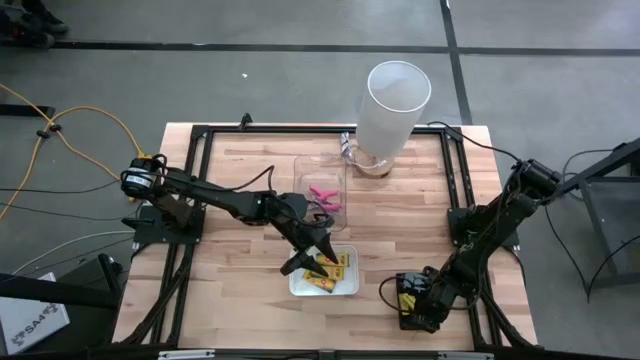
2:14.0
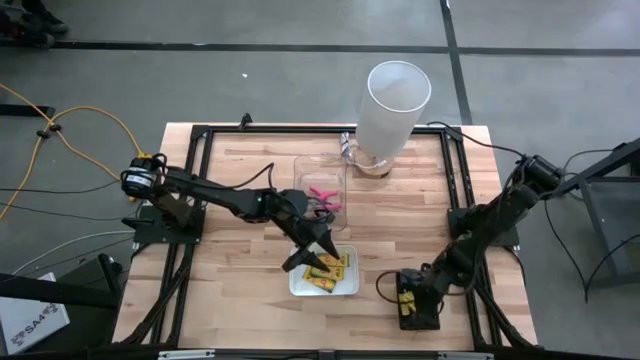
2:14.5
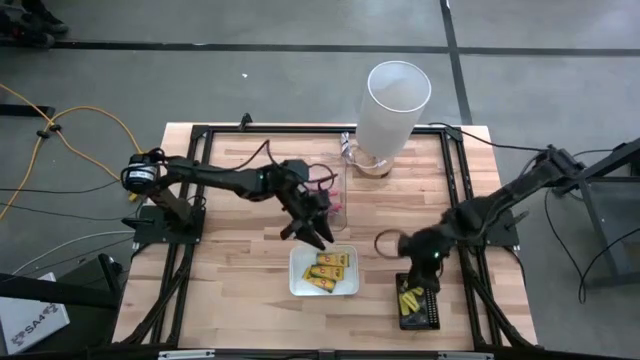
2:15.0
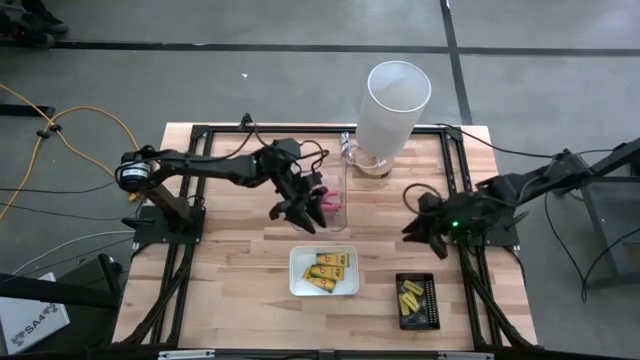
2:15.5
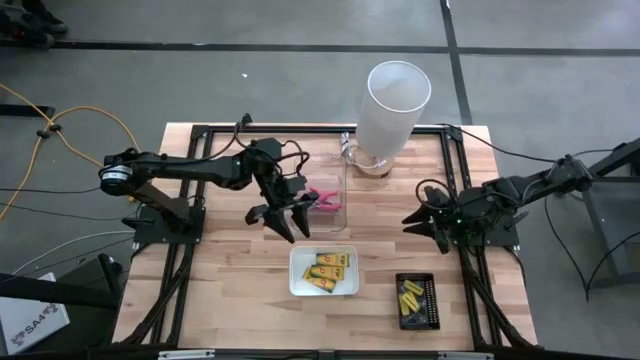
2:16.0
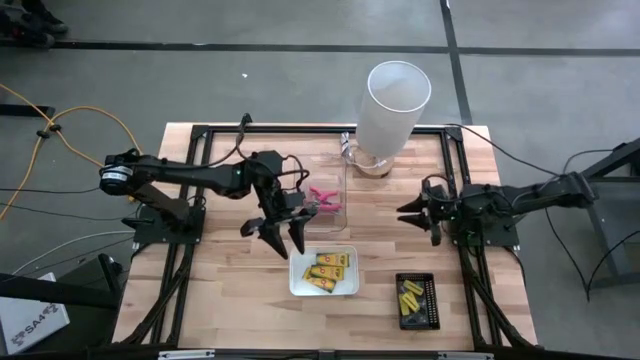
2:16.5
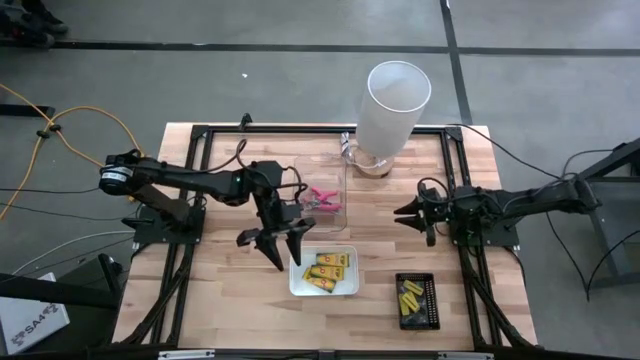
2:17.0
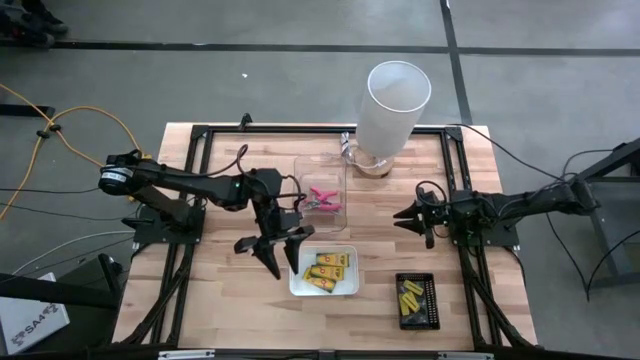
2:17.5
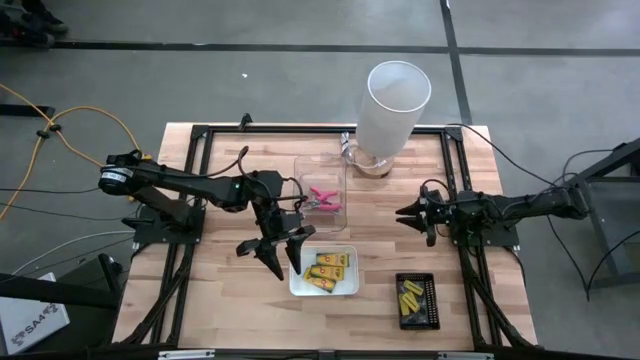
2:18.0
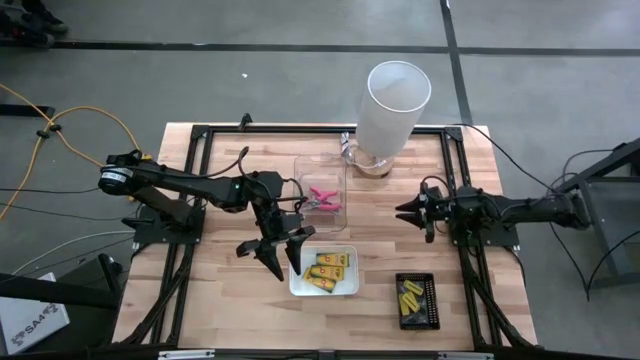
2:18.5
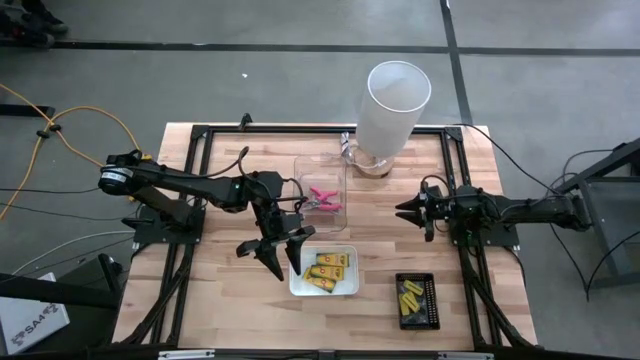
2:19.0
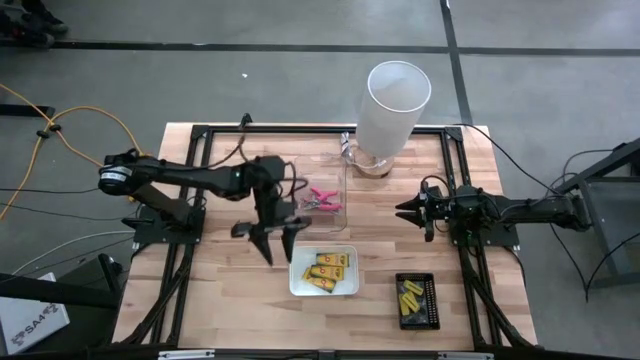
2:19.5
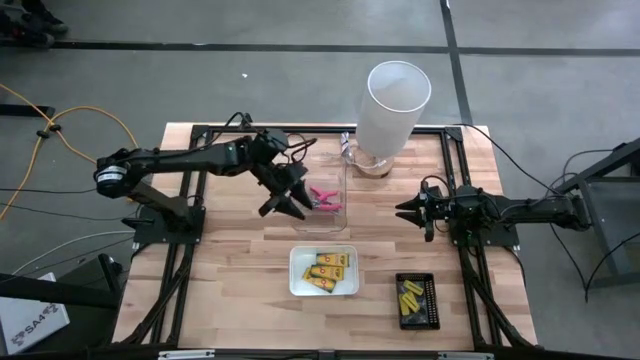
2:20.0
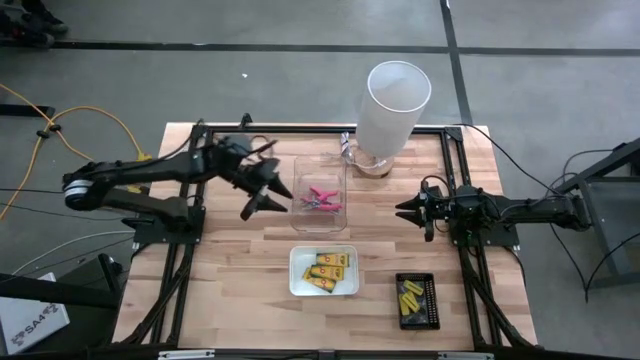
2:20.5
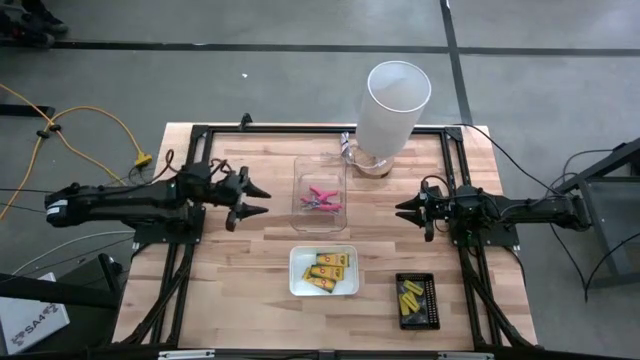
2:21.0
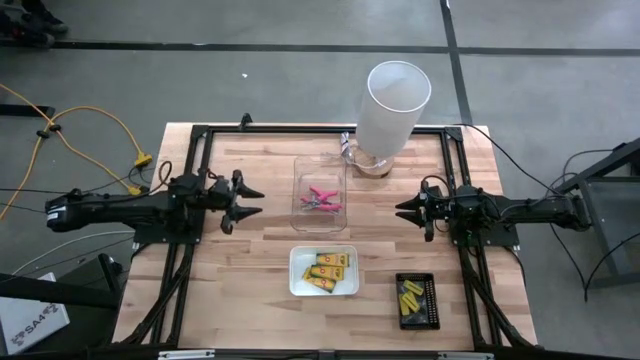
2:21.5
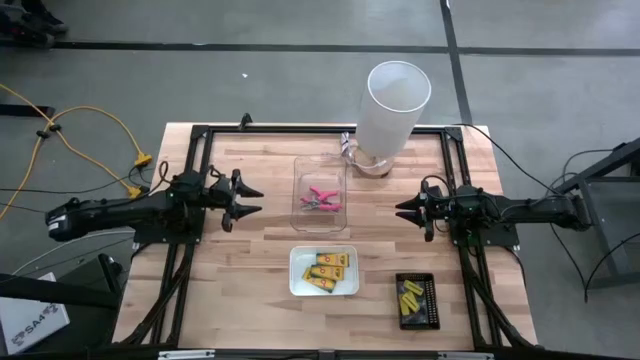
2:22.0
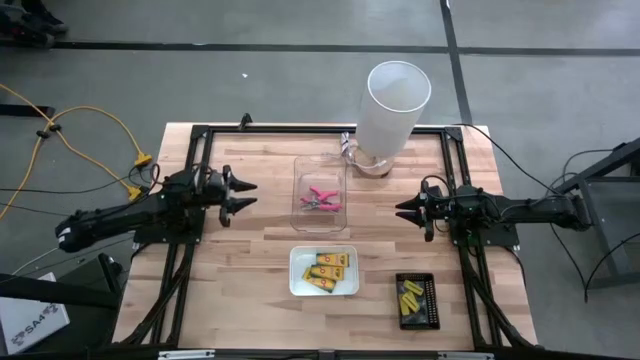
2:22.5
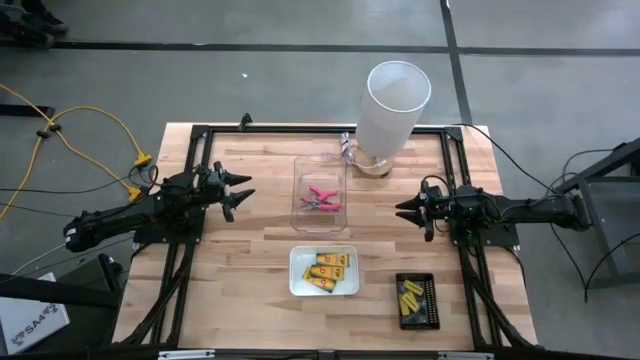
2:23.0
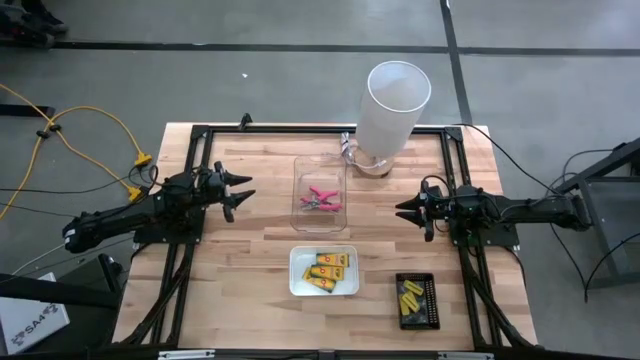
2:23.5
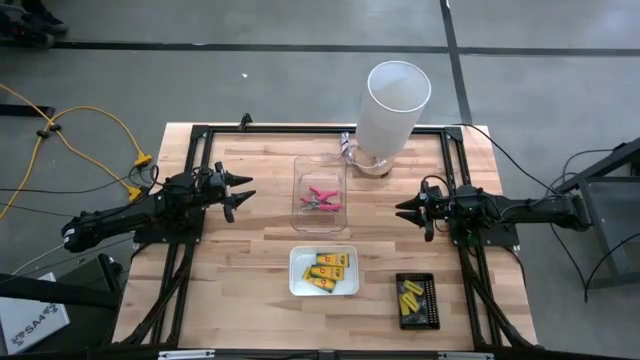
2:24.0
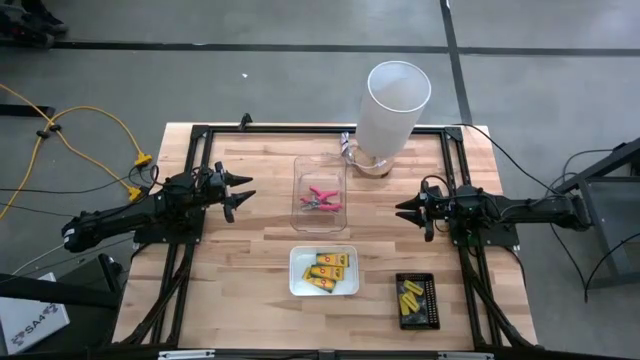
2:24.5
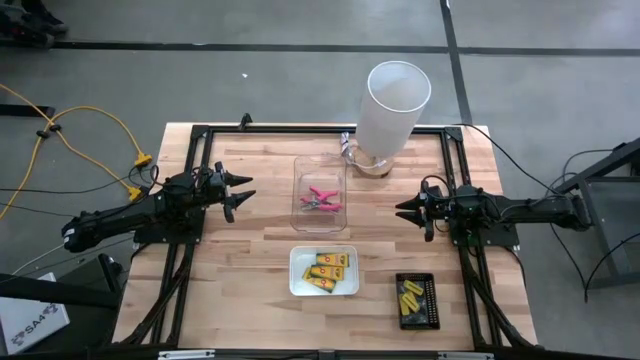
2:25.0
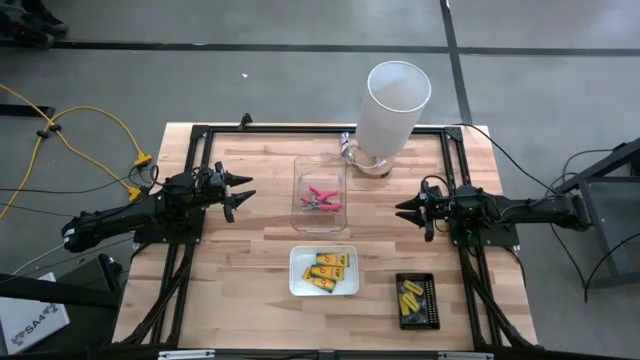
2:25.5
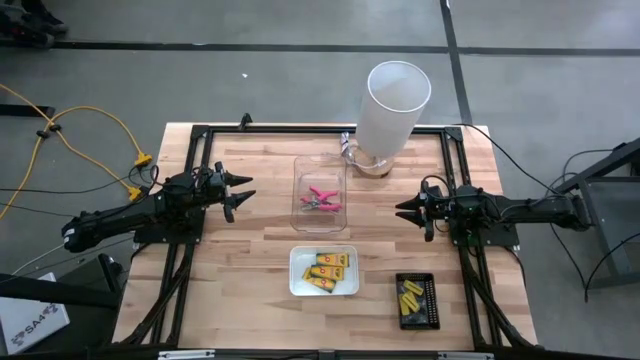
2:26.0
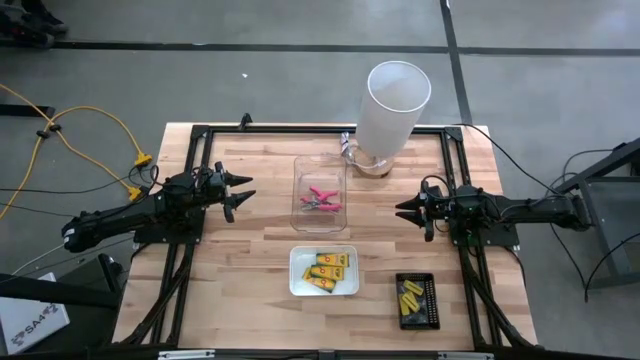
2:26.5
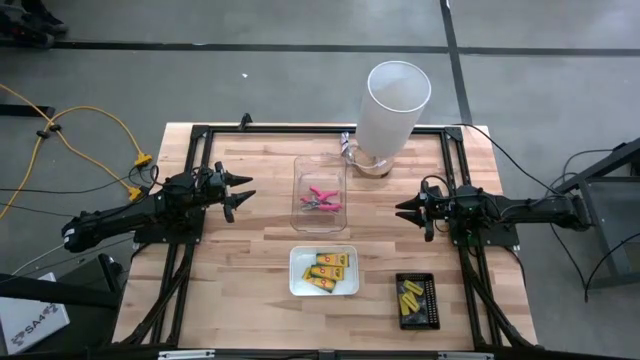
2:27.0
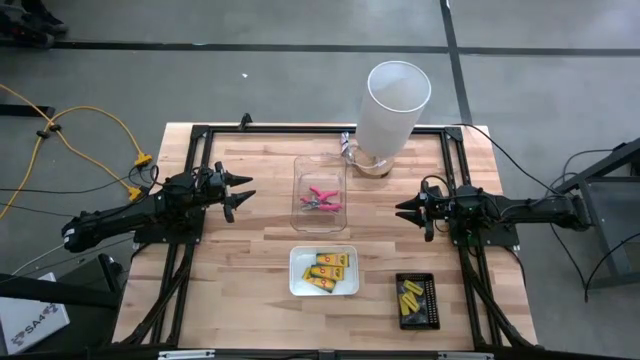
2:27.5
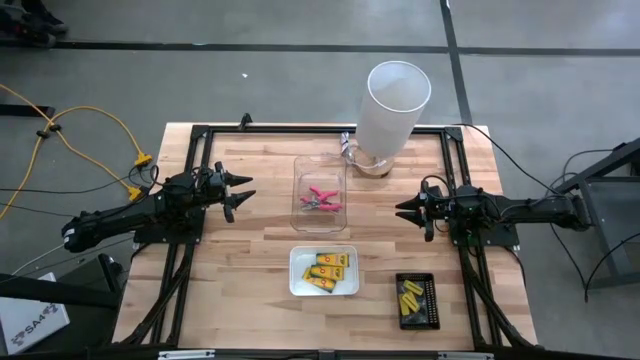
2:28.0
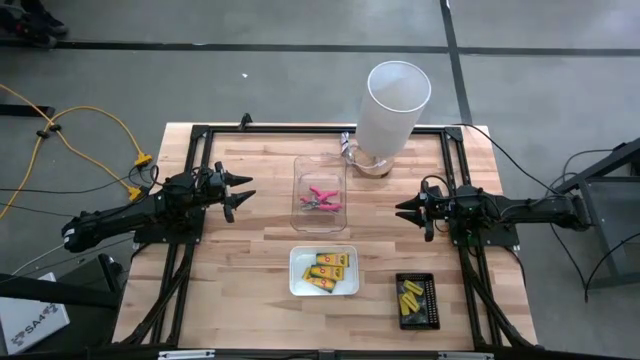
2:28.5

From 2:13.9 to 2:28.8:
Task: Pick & Place School Supplies
Return to Home Position

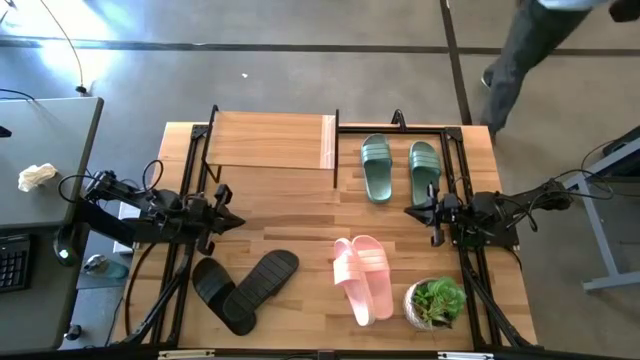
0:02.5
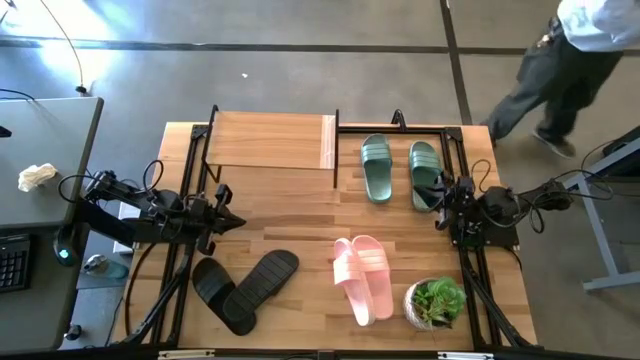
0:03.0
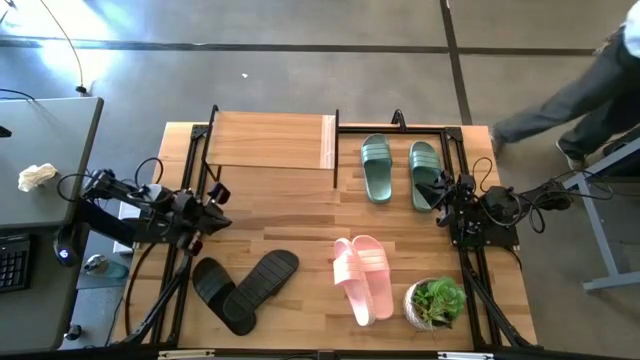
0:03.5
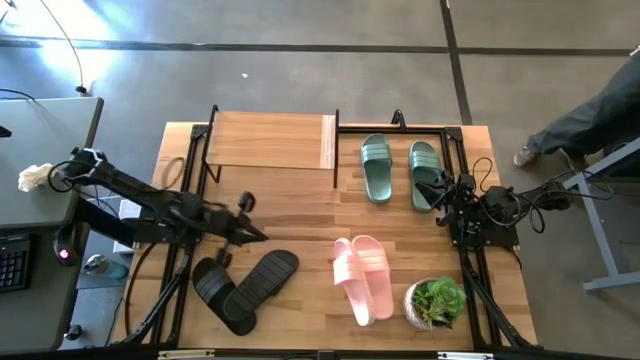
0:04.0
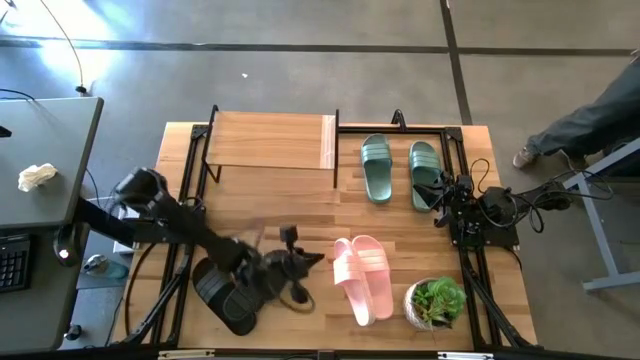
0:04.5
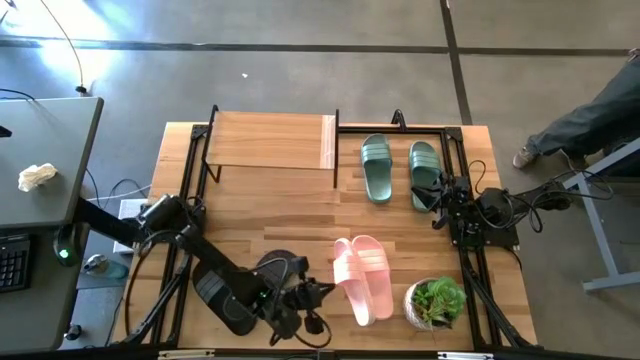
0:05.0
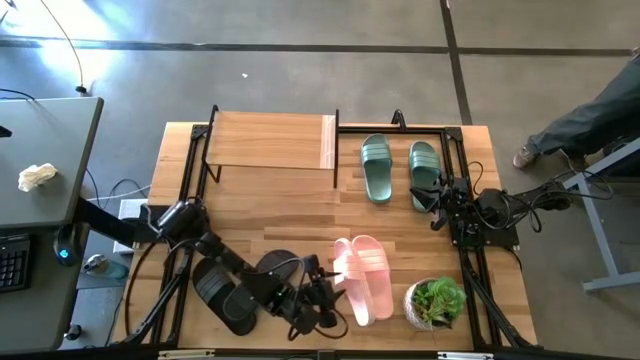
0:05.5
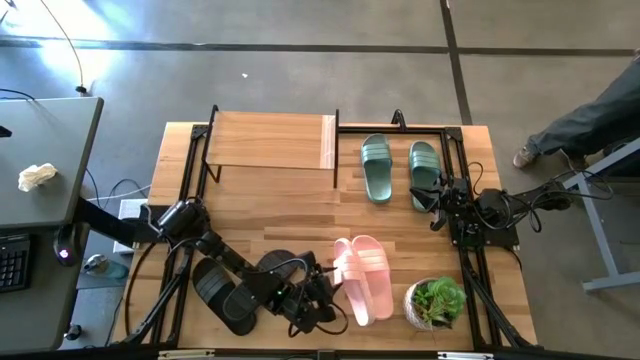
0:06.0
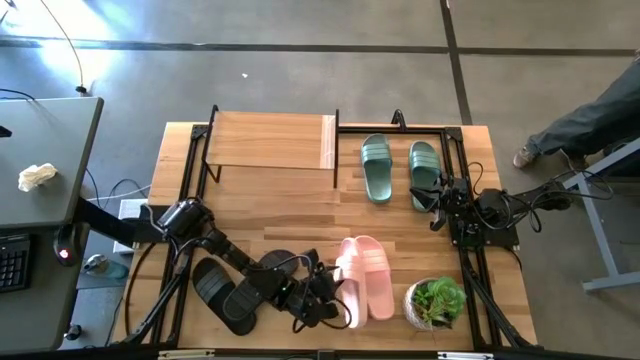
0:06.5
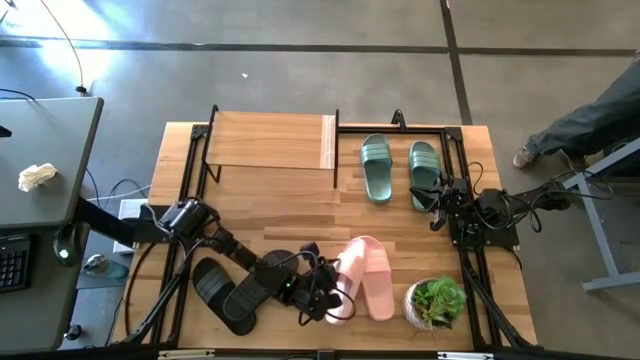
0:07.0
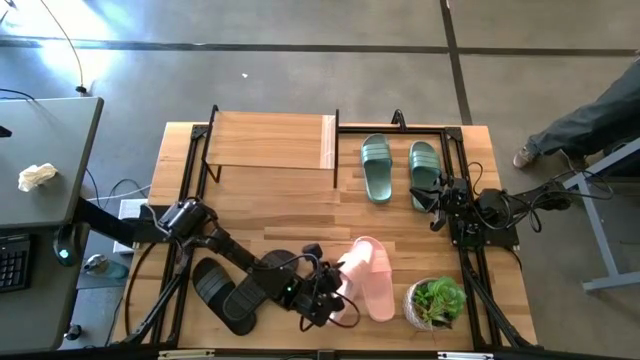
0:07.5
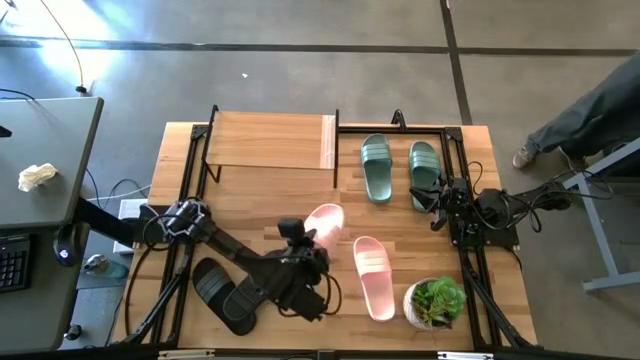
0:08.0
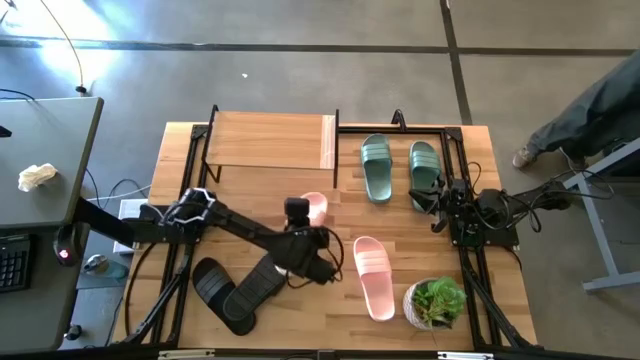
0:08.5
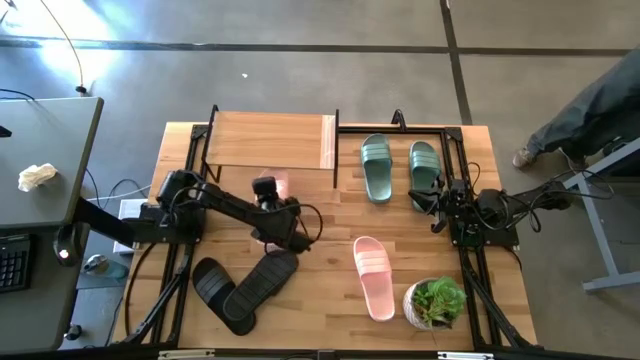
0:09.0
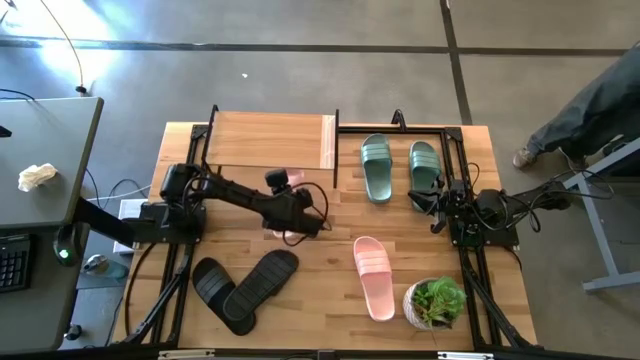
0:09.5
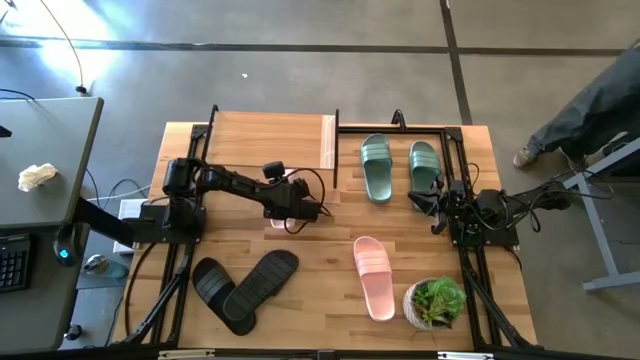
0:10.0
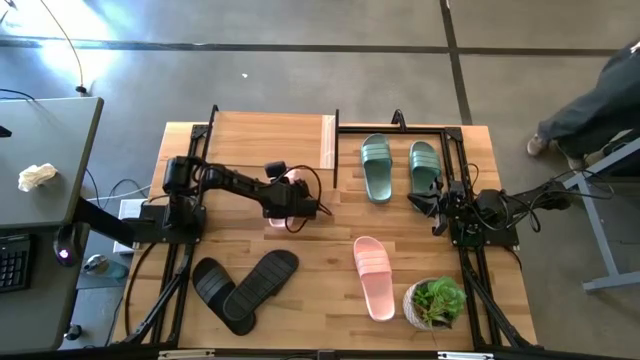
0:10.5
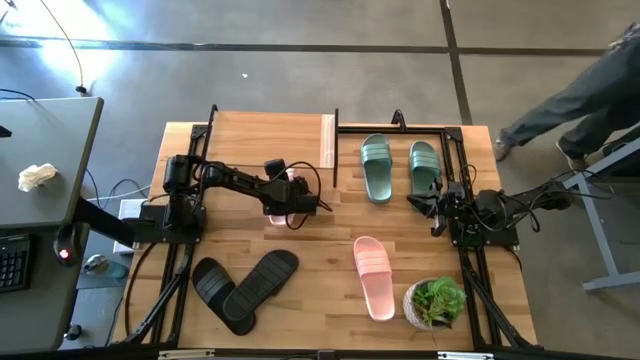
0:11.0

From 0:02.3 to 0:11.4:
Task: Pick and place slides into the shelf
Put the left pink slipper under the shelf
